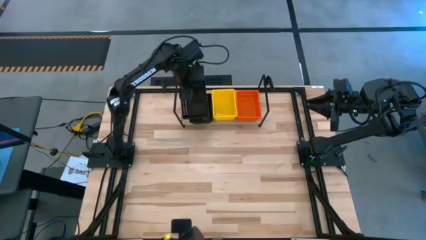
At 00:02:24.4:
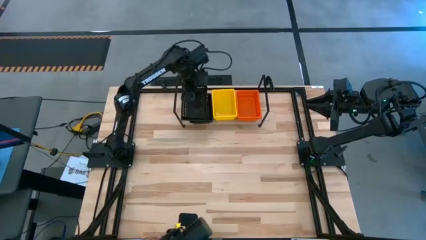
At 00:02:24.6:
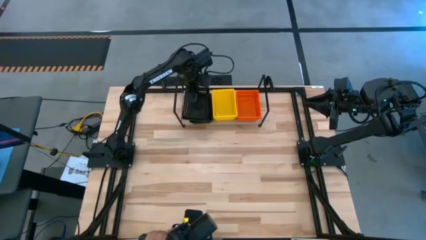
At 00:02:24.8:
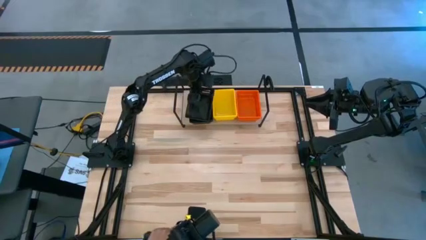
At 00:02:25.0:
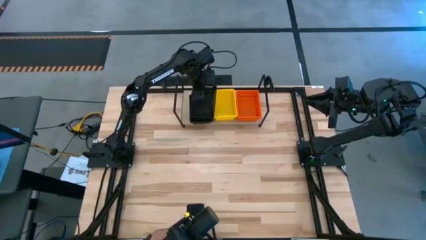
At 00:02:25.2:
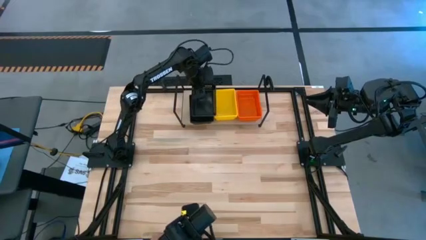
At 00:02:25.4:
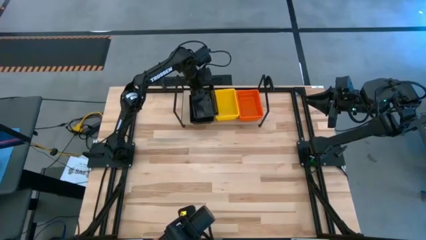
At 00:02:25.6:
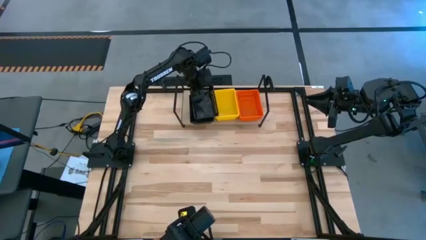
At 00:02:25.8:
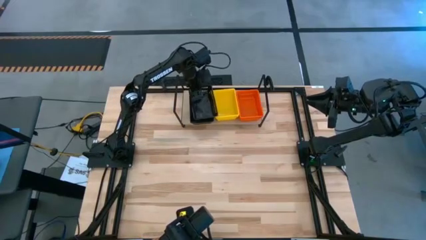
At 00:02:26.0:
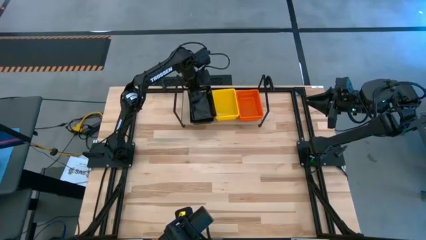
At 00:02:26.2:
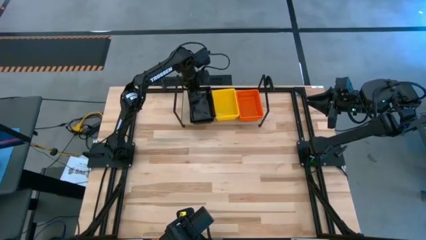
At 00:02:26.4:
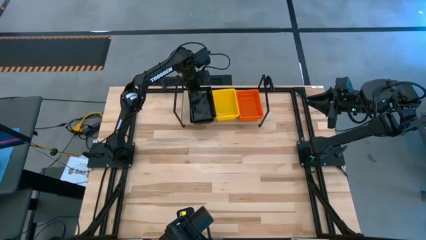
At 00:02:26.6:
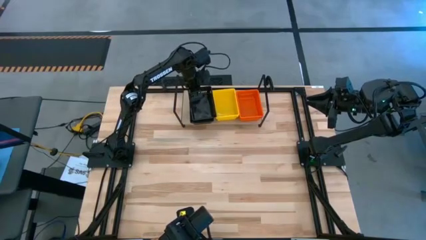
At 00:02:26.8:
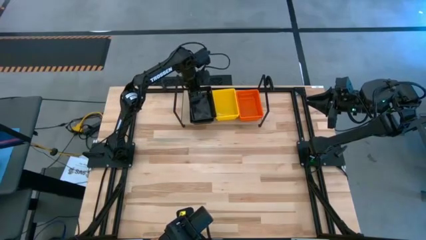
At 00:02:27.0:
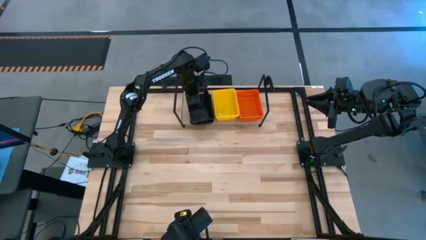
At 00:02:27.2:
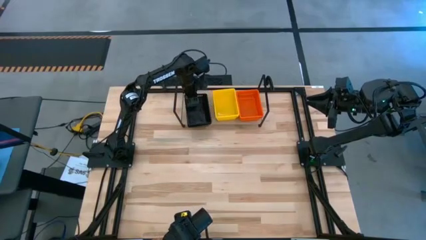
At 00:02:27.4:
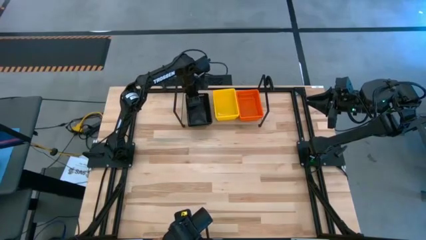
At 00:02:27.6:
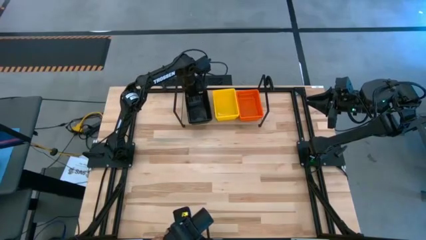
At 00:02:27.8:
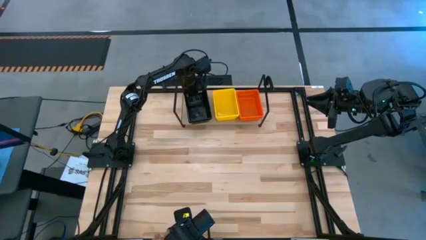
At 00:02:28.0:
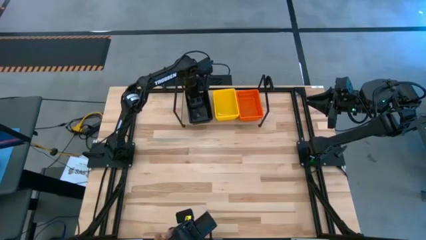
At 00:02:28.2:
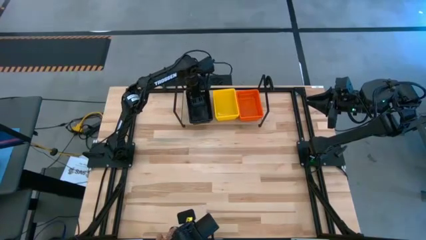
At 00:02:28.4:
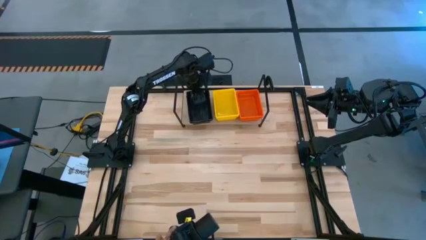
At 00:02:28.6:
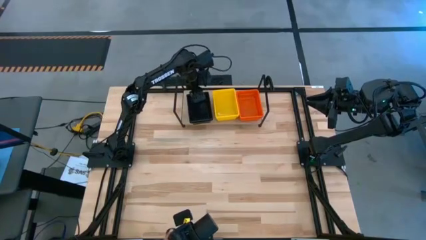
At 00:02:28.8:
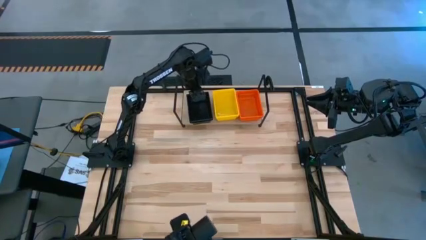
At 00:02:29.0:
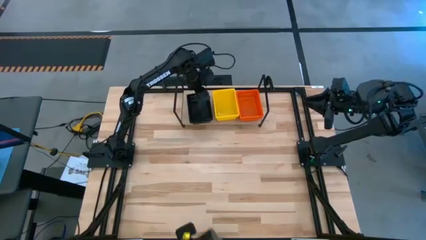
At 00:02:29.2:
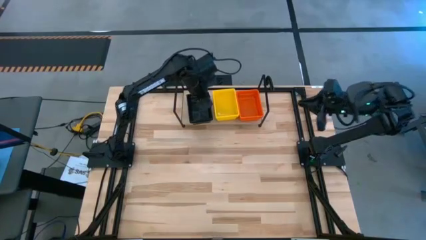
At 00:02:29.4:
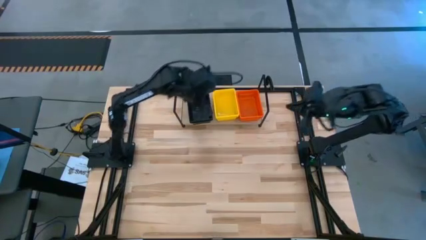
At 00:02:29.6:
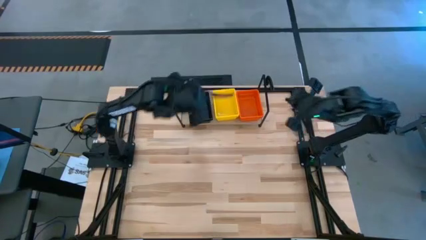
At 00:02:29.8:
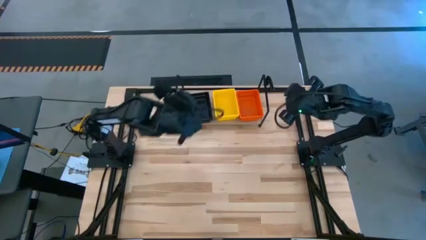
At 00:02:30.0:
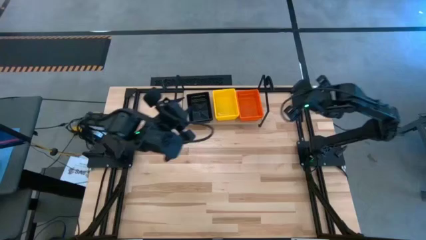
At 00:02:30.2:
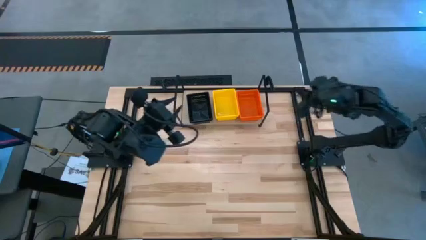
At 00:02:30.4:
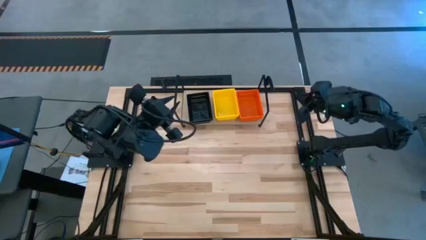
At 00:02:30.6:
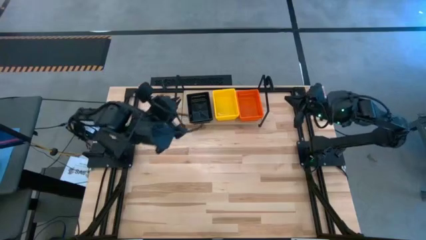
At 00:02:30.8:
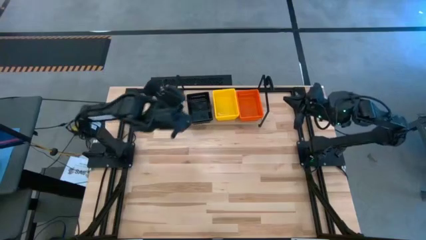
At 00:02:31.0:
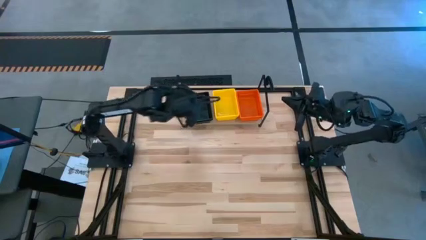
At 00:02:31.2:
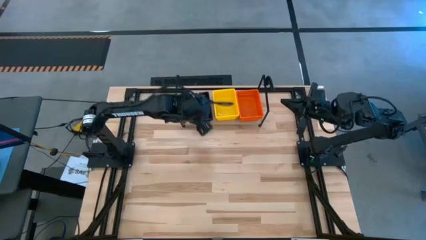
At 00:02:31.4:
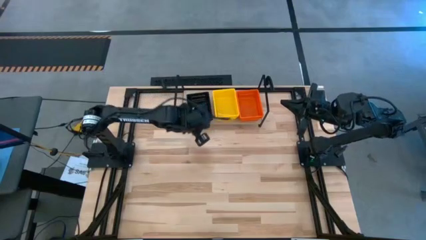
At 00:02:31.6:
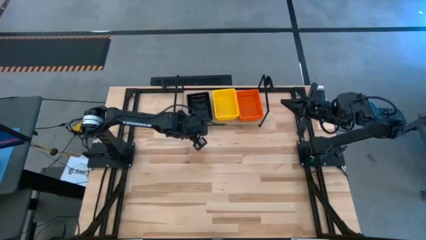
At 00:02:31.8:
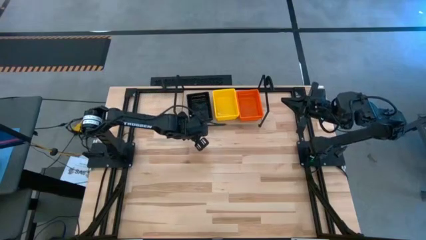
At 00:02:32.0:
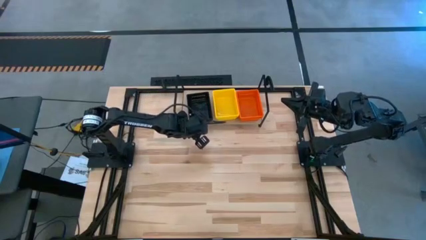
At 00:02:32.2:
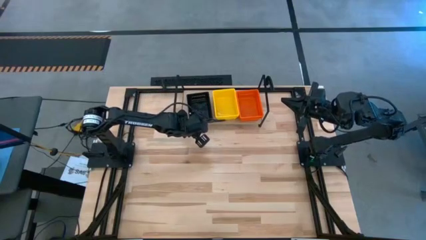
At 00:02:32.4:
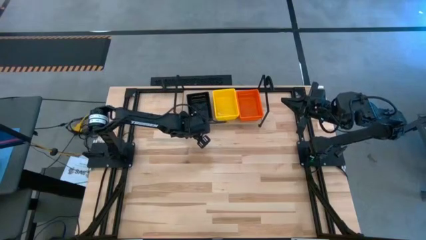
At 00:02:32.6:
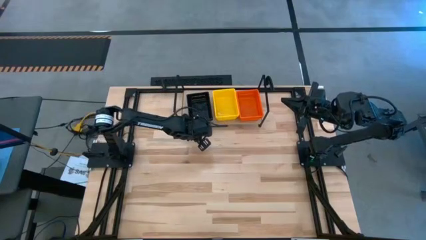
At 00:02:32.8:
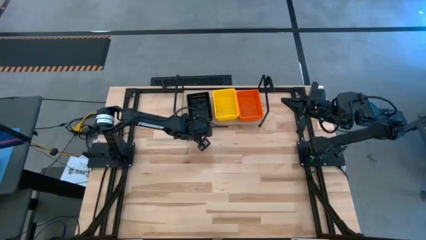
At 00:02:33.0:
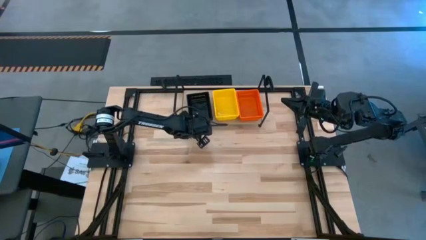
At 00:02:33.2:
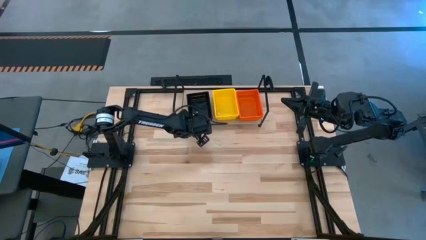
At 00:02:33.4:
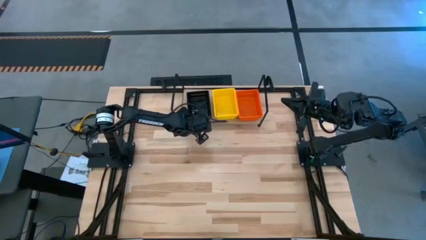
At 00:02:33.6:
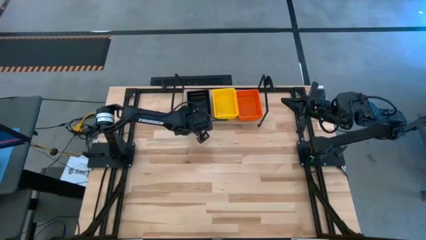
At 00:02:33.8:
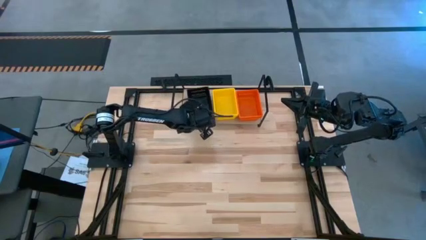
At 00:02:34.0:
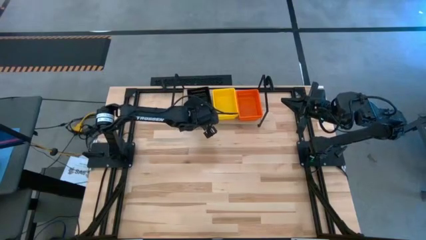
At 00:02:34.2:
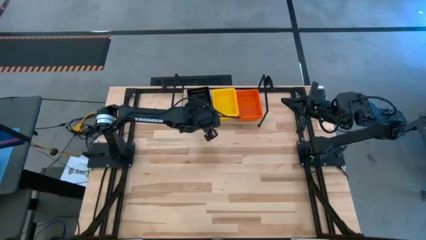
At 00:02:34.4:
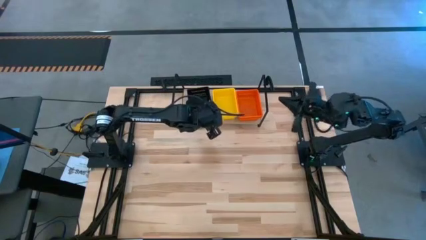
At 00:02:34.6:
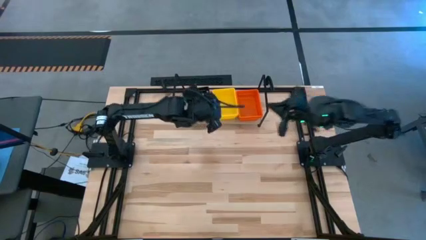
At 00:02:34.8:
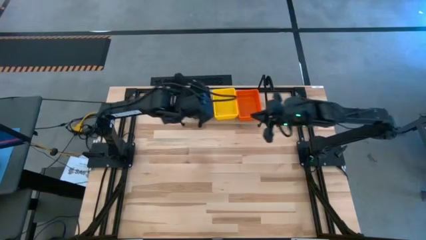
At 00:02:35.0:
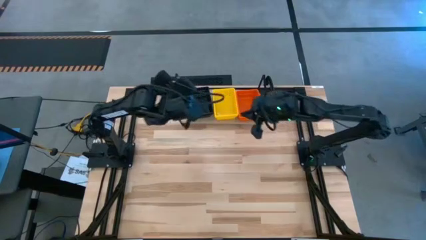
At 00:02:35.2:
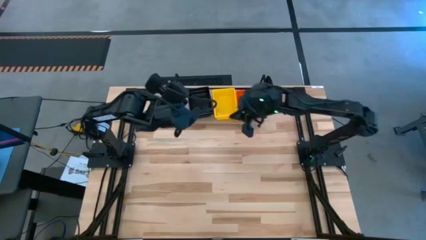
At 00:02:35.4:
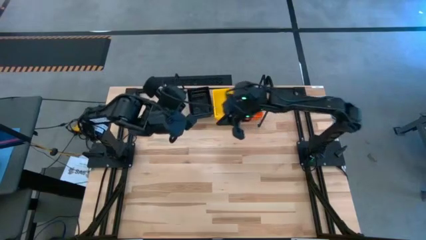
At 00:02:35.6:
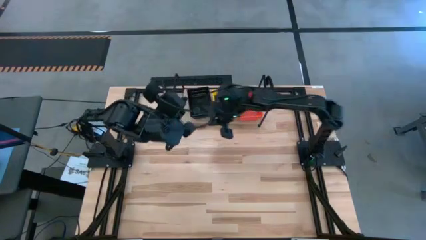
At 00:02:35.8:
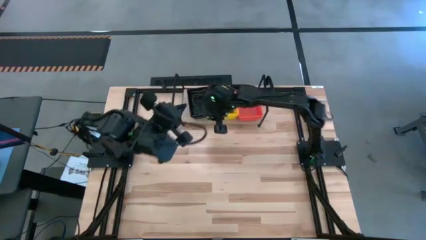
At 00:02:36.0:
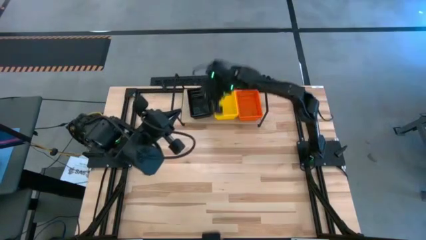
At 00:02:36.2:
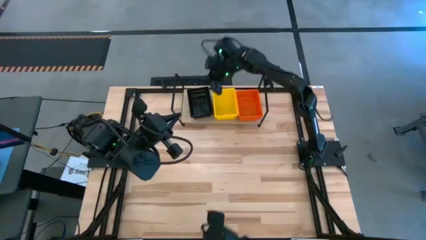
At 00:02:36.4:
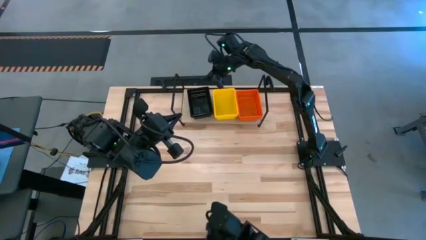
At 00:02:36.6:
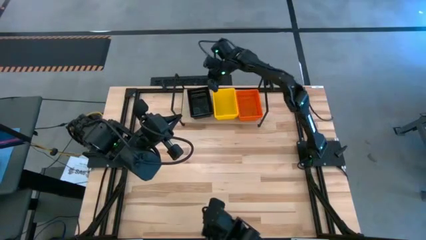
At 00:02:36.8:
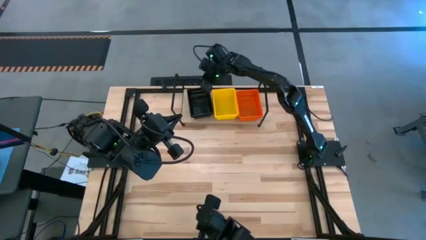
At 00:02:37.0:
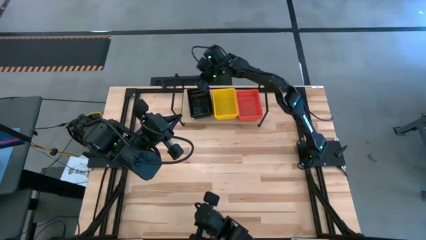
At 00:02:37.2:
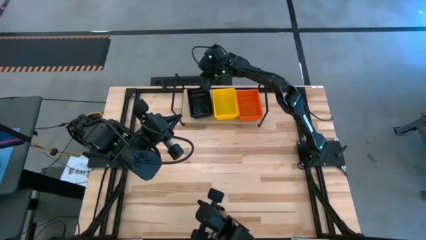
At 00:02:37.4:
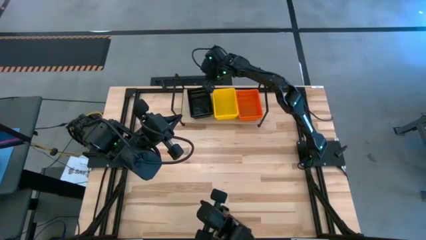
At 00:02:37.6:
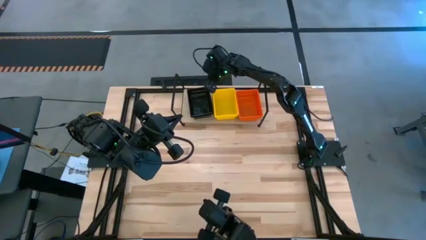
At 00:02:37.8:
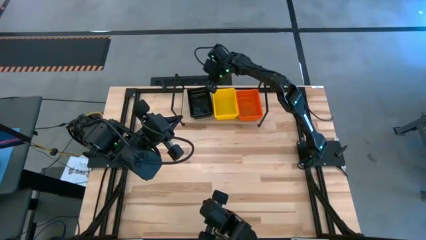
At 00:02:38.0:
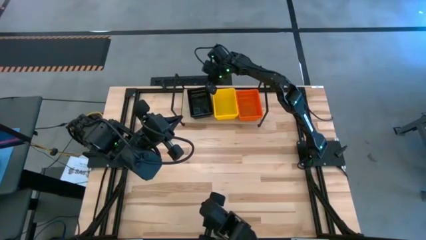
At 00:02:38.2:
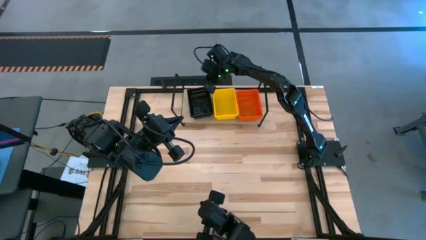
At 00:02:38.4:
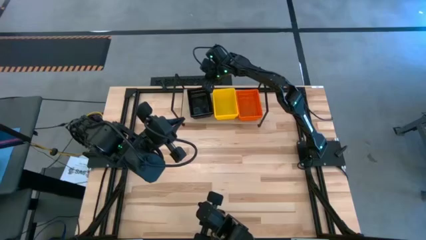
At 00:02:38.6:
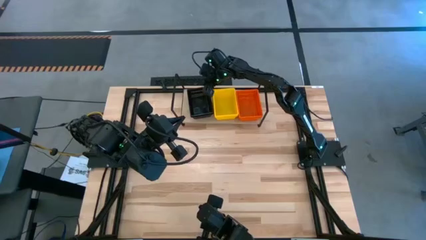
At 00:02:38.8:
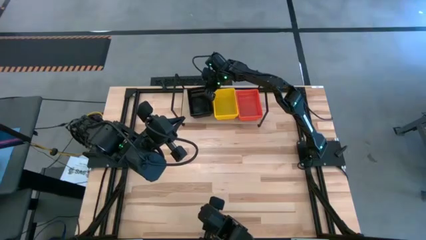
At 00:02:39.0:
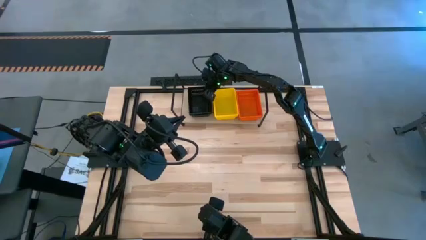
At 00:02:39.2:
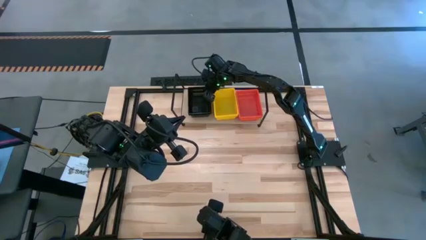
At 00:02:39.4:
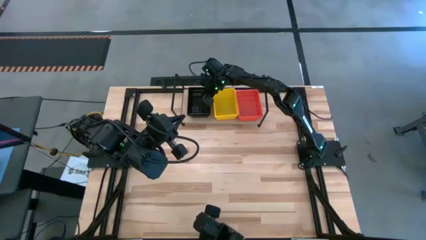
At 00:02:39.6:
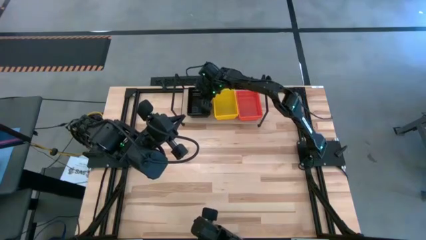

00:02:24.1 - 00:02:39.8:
Task: Stack baskets on shelf by color
Stack the black bin on top of the other stacked black bins on the shelf
